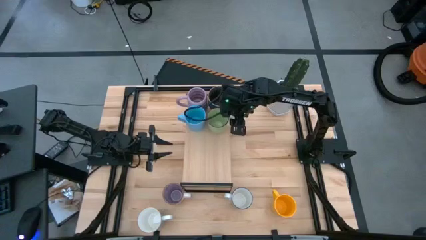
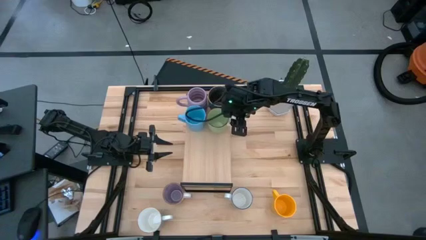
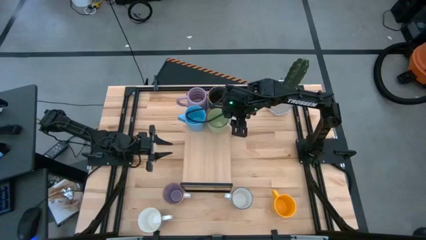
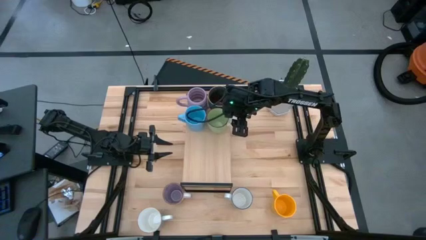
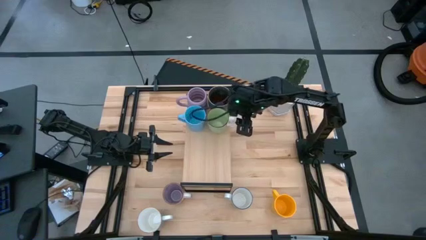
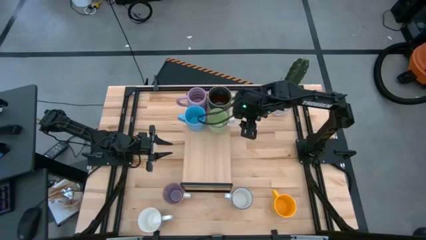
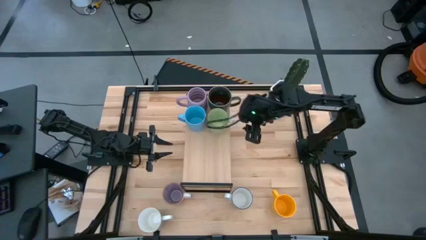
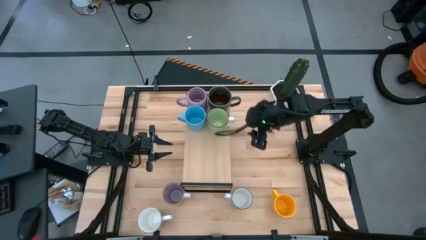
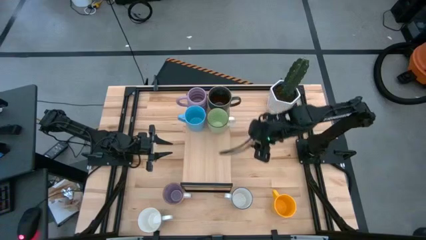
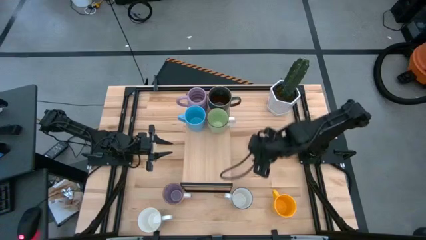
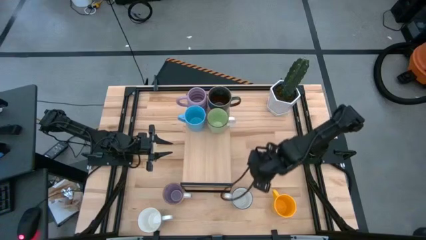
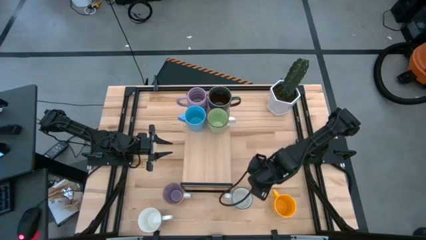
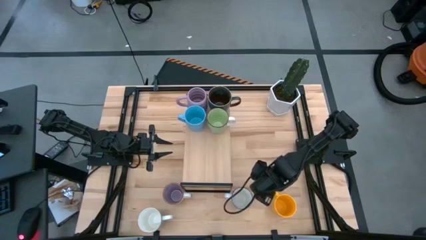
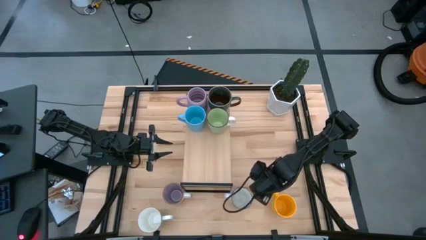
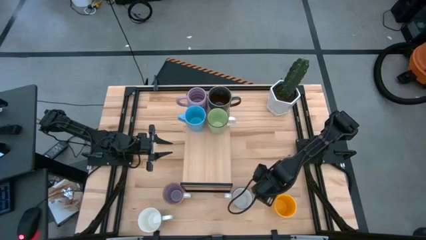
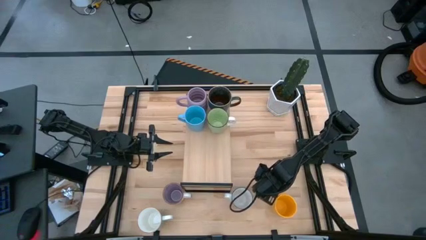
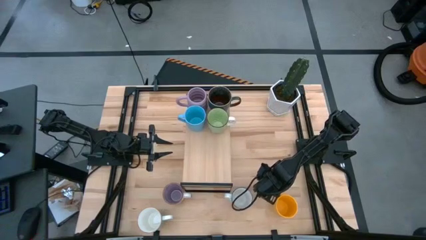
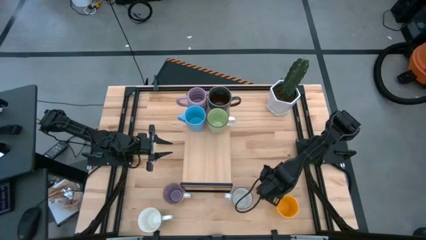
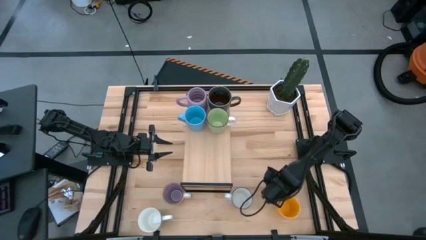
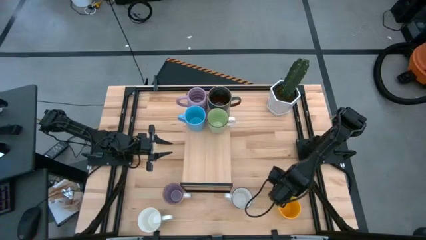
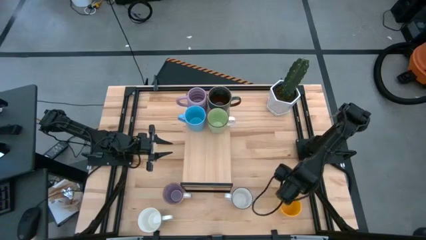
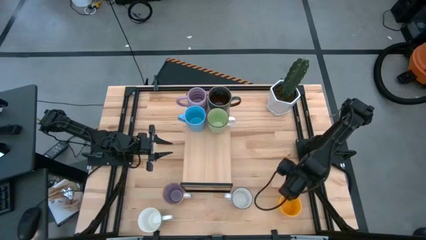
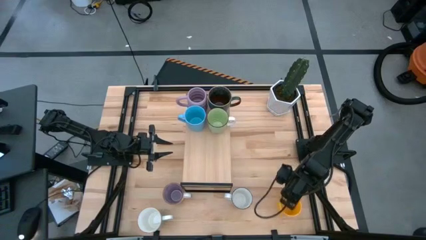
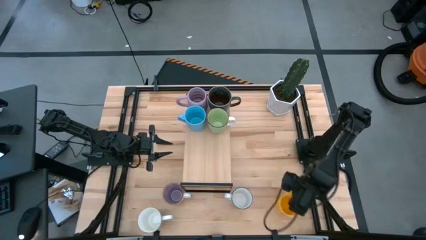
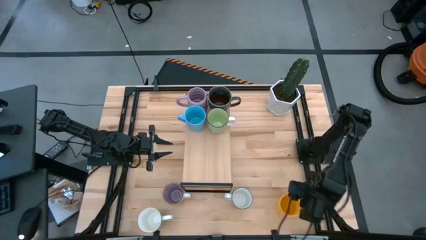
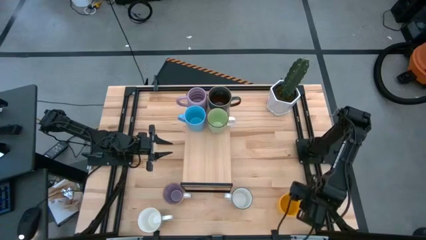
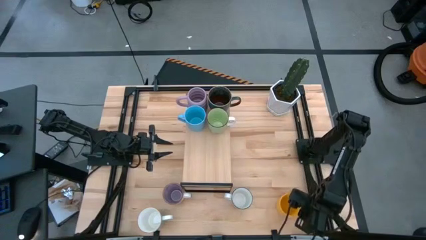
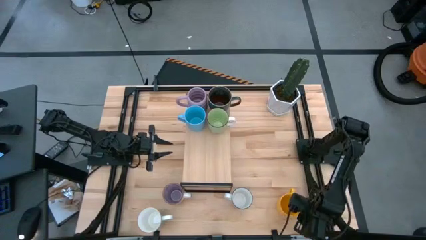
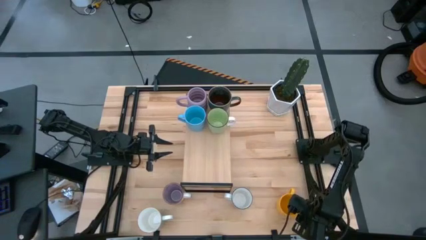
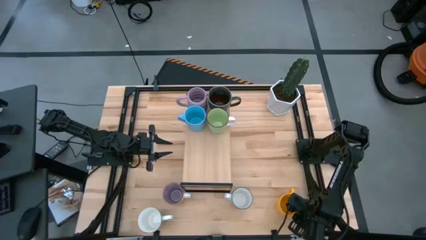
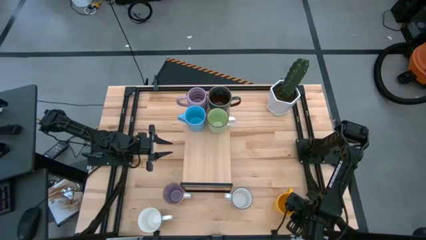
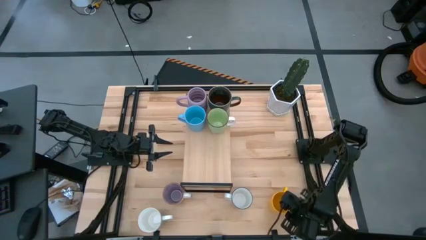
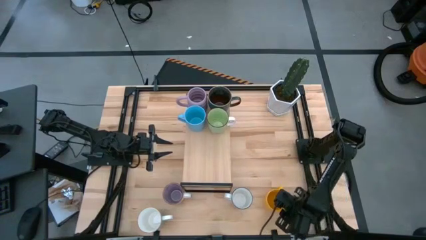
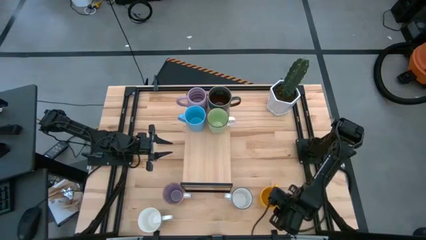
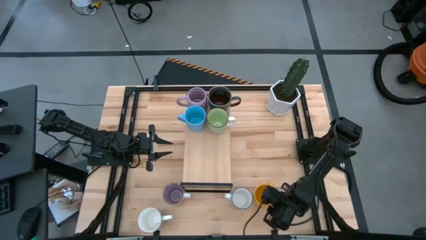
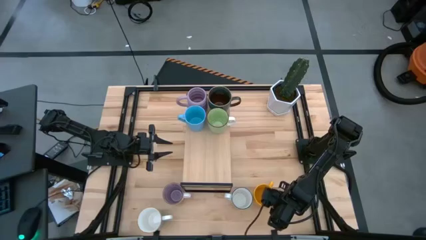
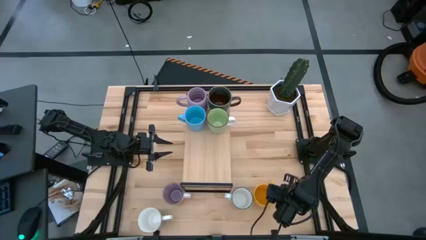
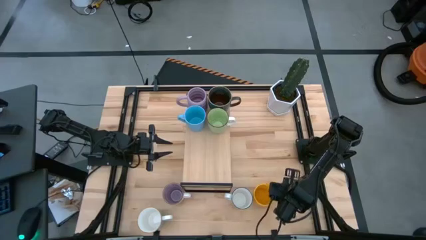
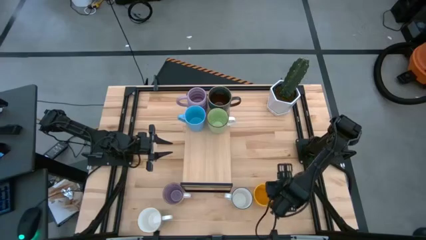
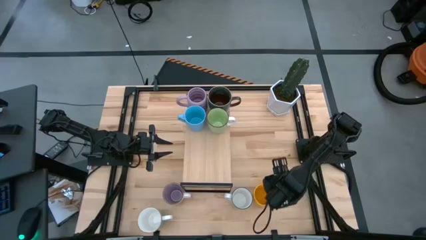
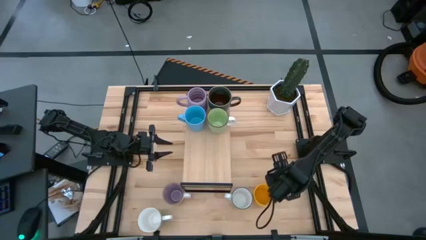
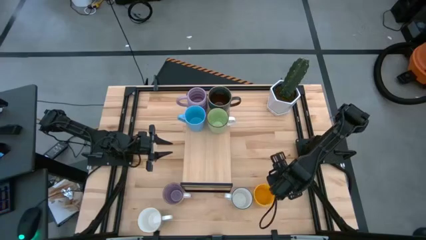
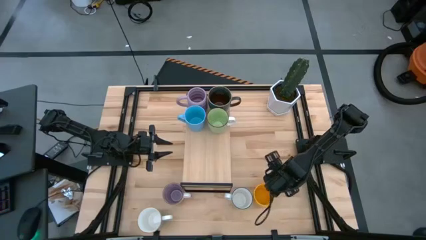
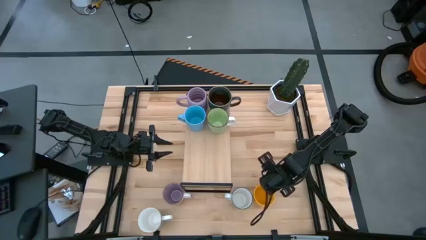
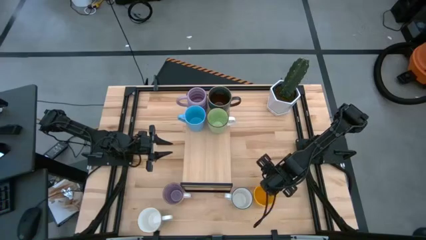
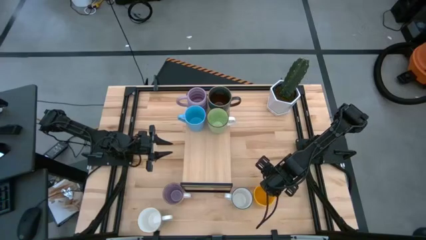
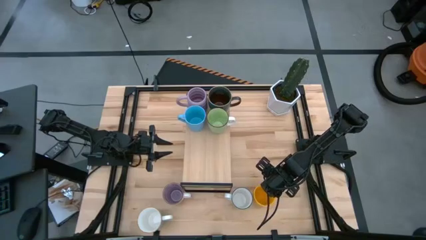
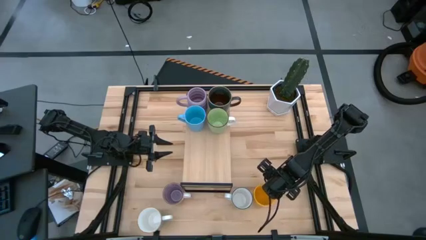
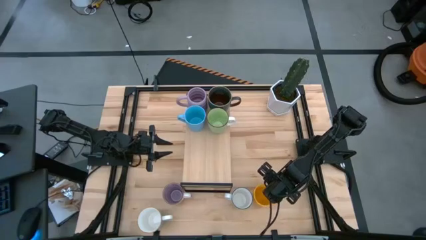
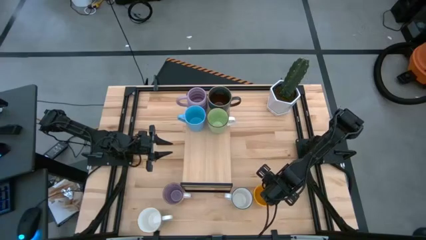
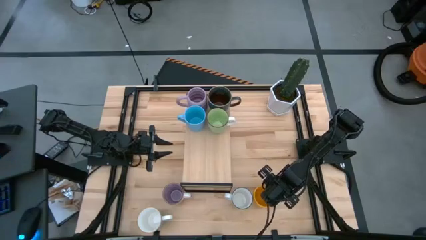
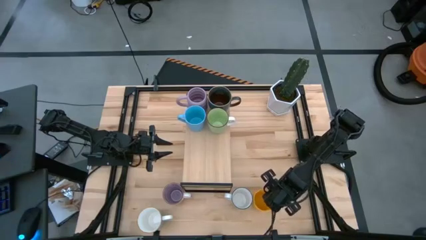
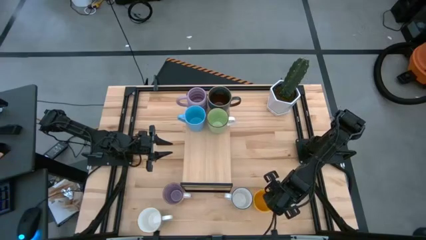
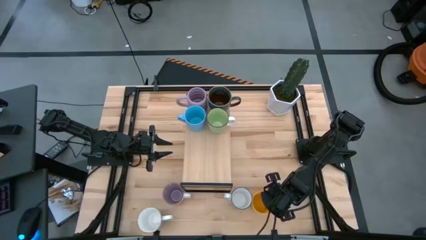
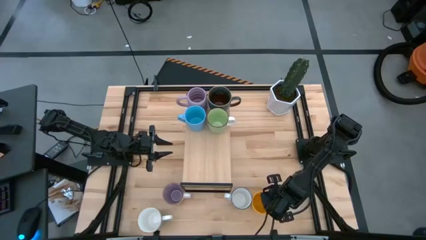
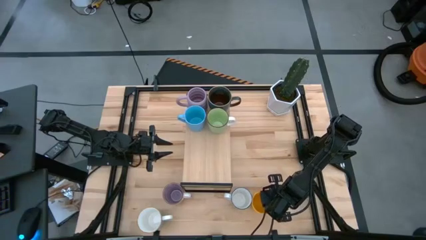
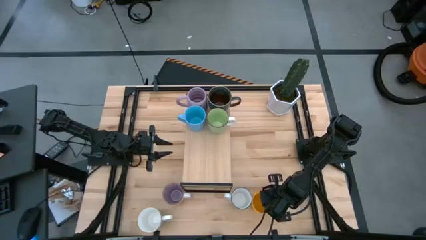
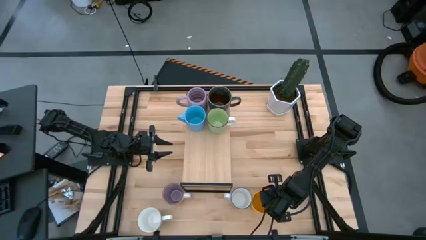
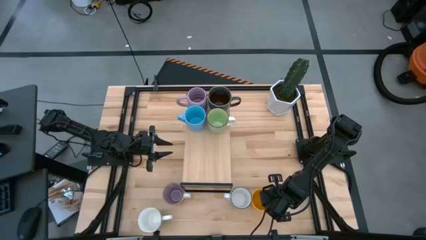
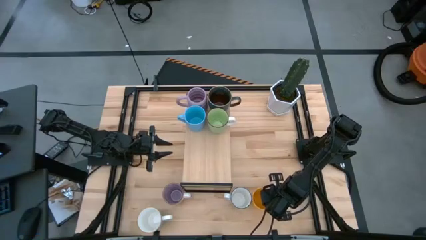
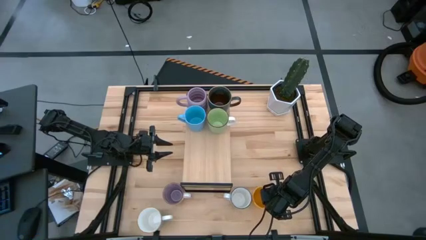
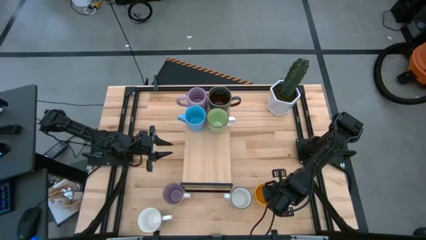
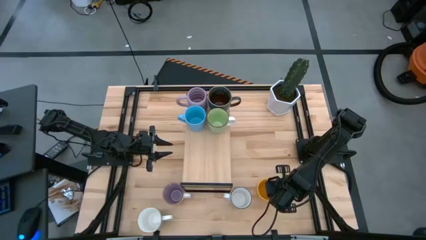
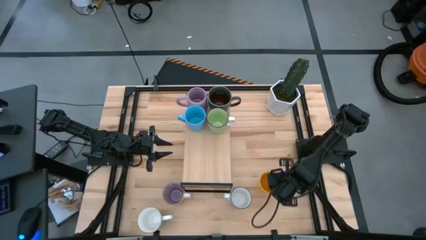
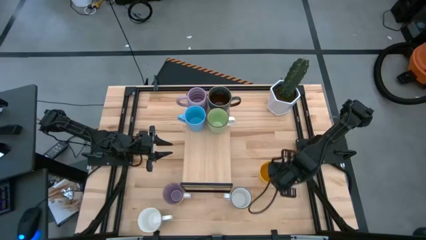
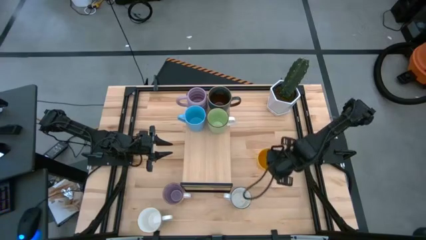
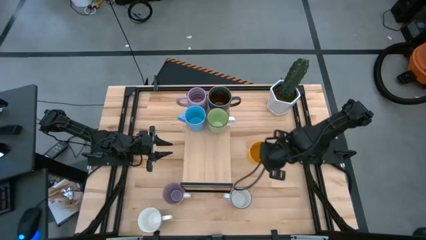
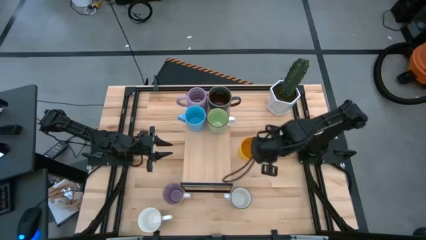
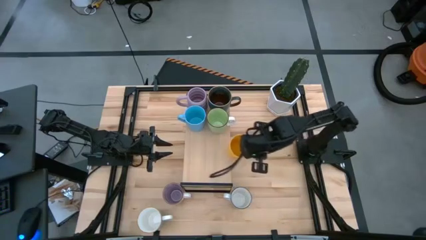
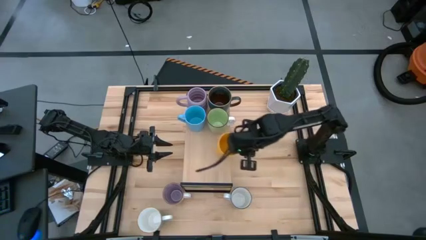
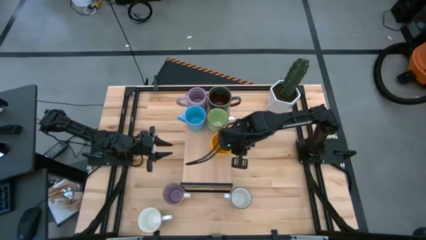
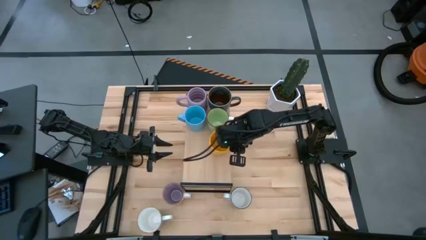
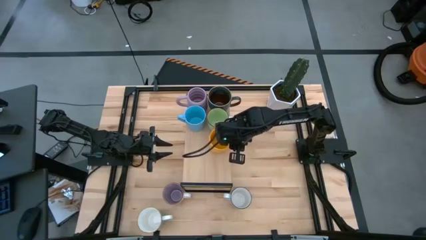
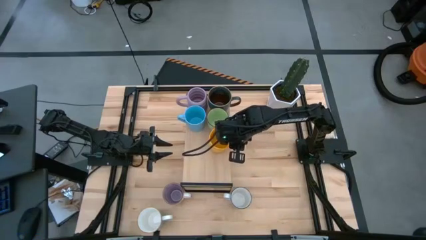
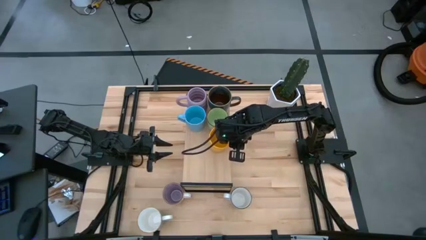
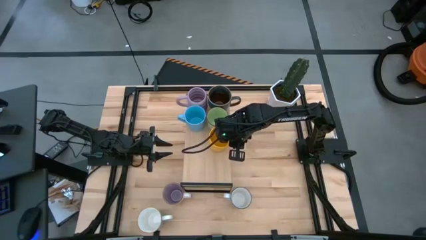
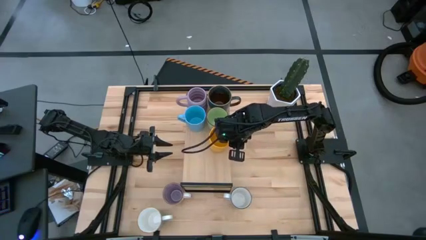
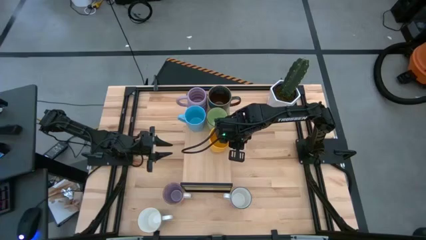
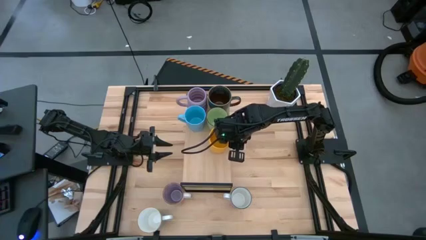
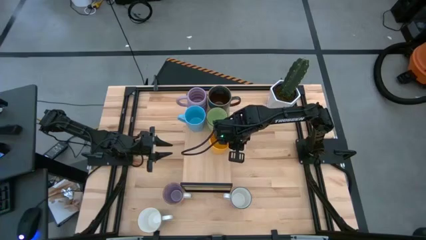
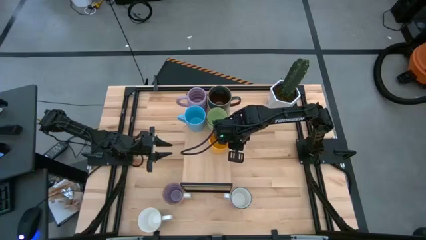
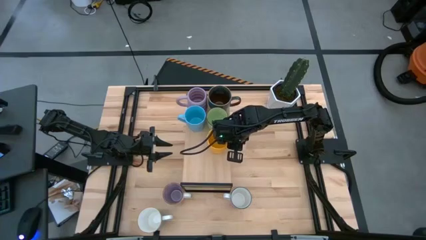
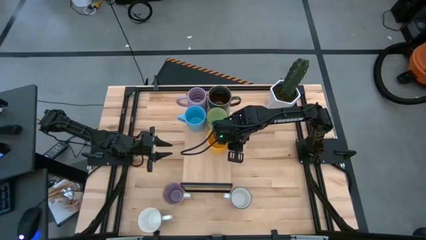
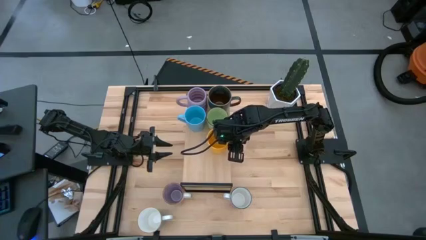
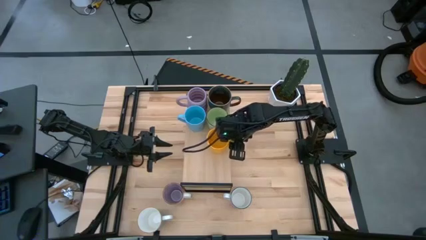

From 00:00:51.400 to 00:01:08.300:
Task: Place coffee mugs
Put the yellow mug on the shelf
